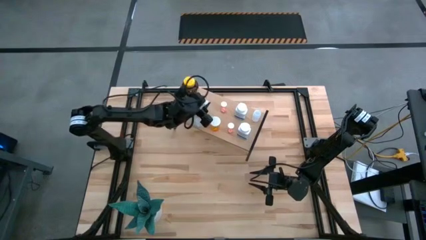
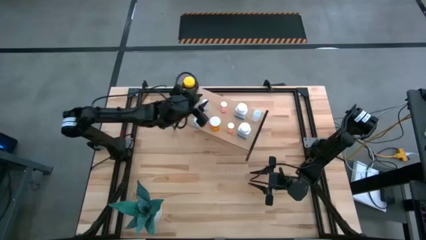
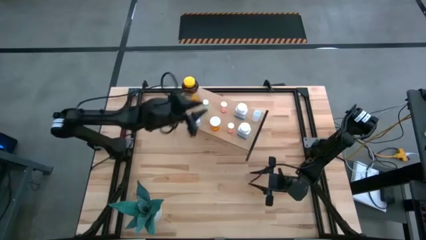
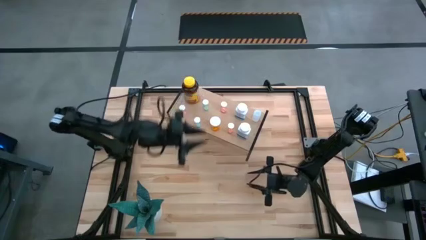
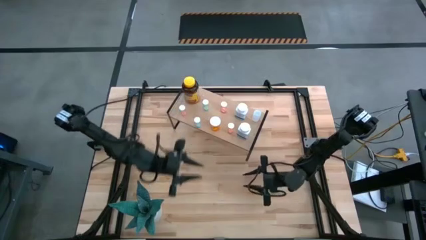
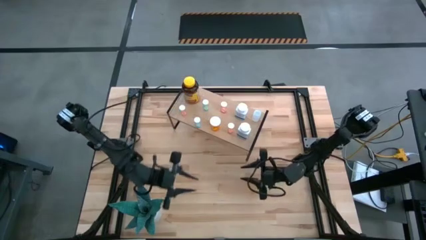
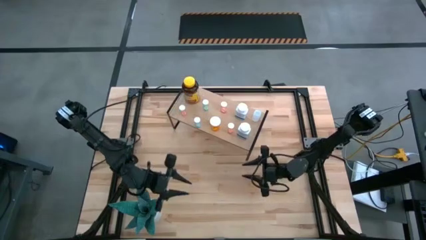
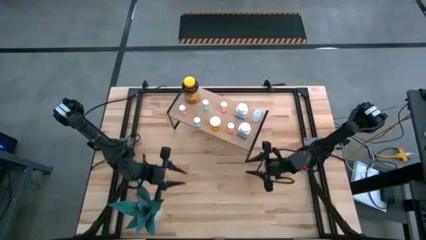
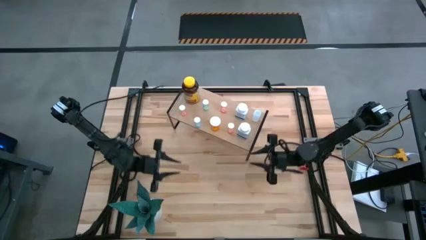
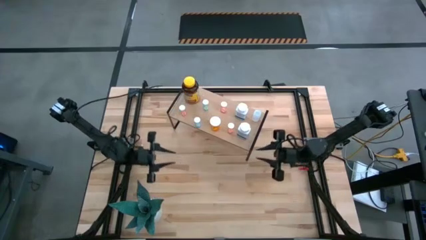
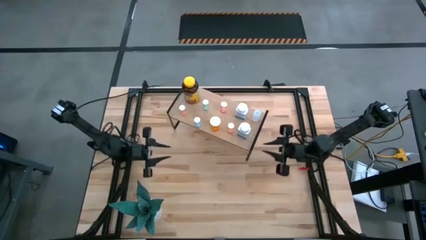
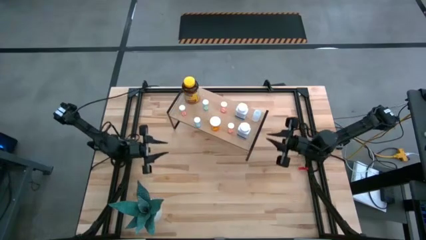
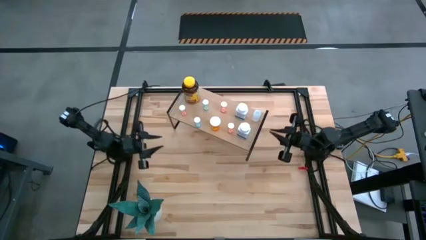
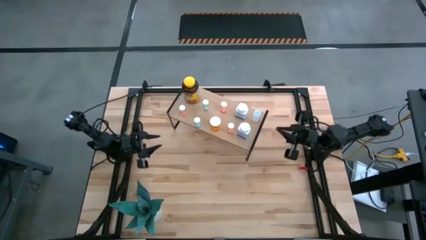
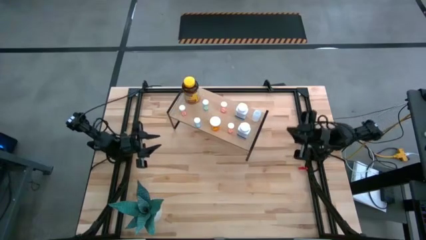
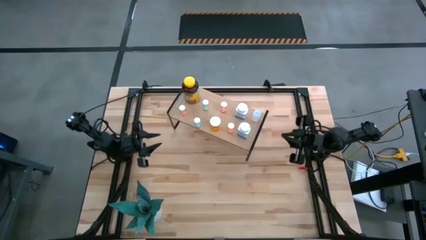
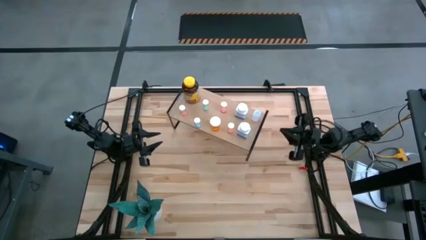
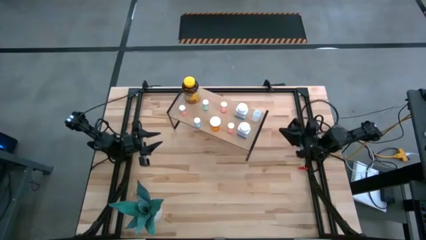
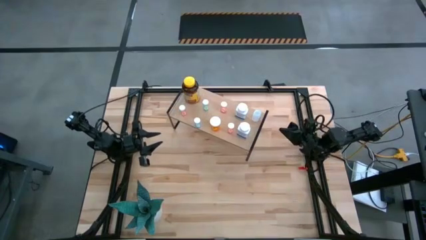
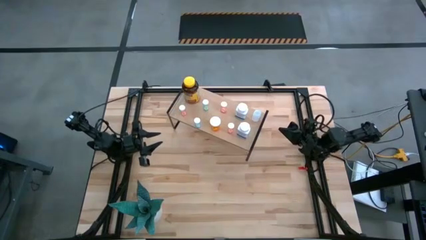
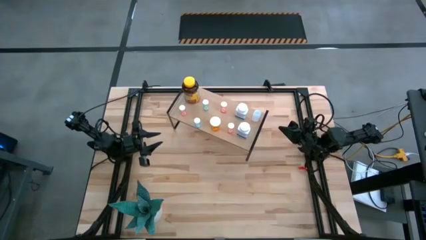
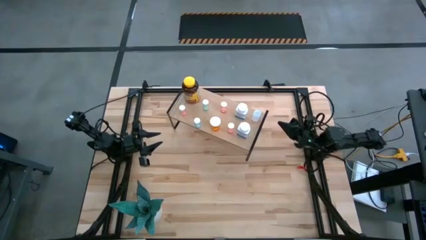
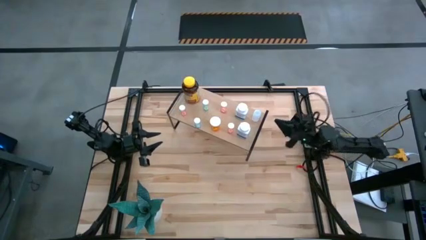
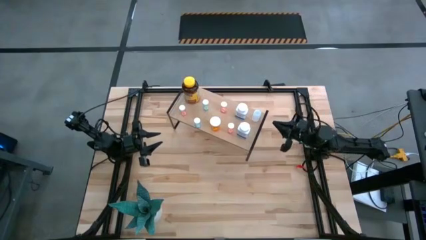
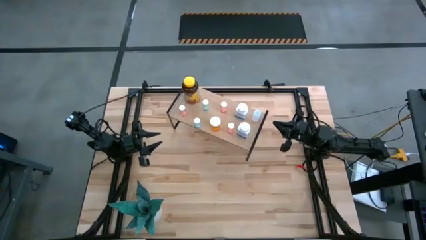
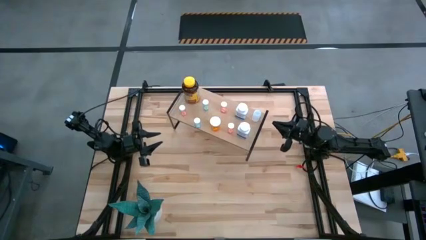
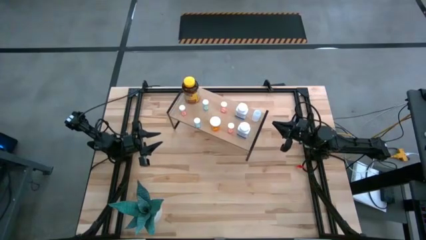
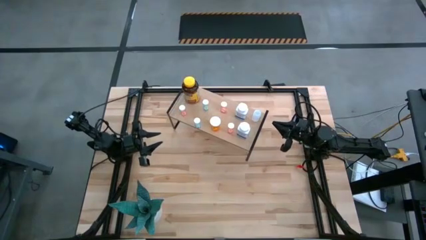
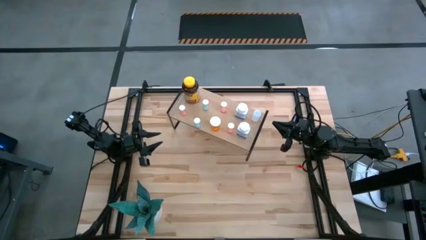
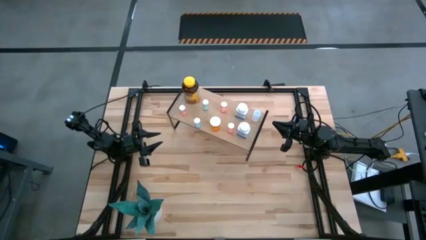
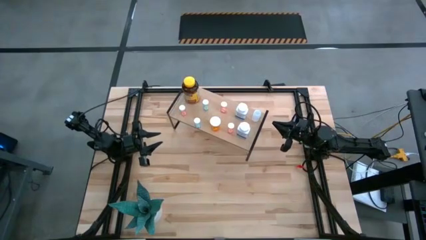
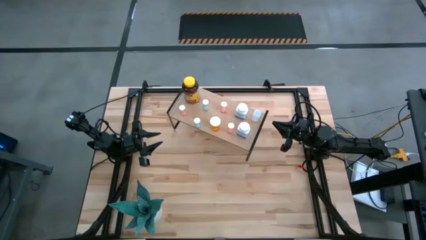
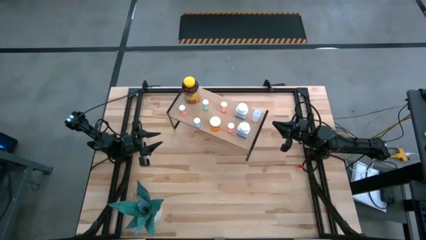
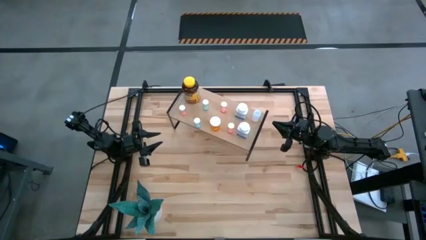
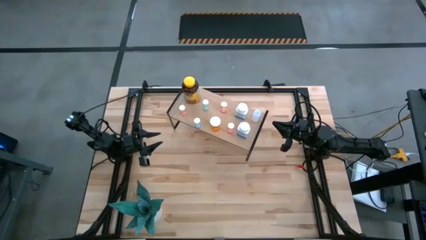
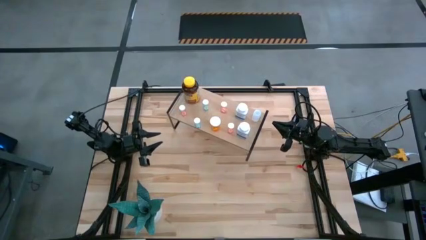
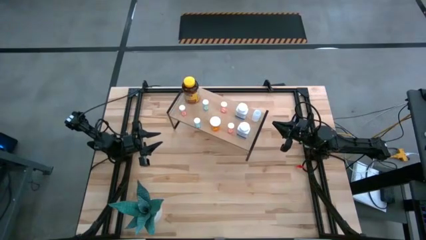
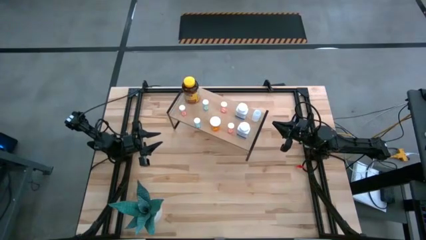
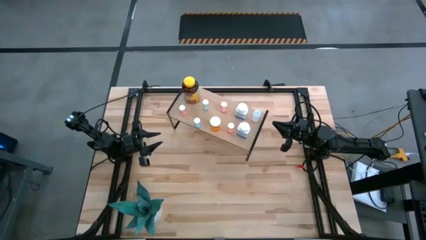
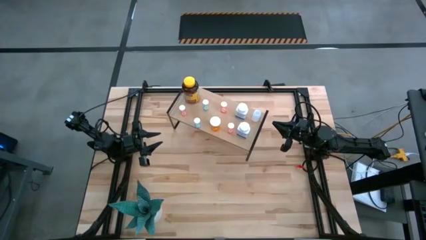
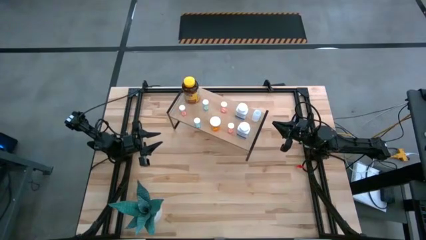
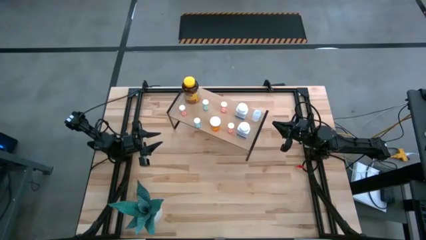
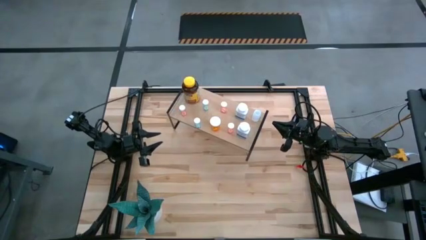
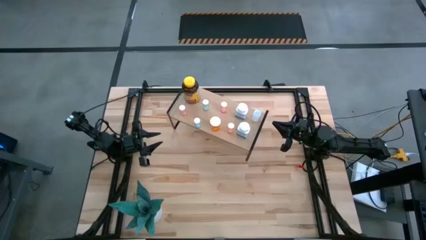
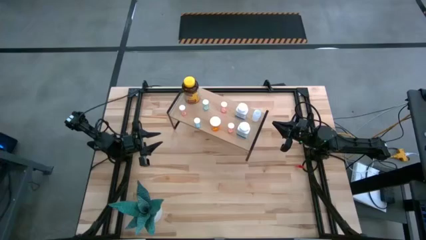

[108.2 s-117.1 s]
Task: Pick and place medicine bottles onto shelf by color
Return to Home Position

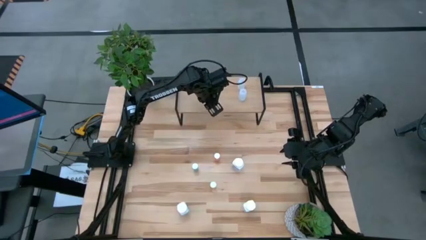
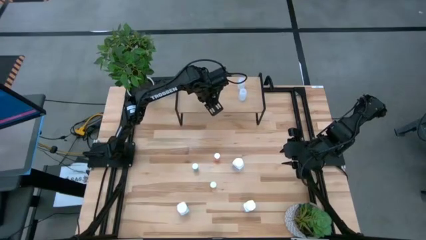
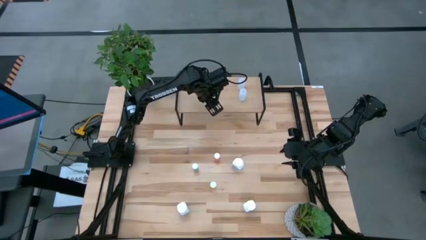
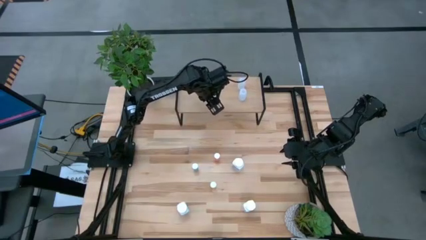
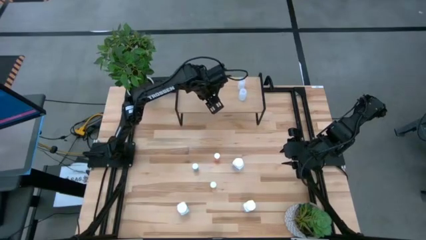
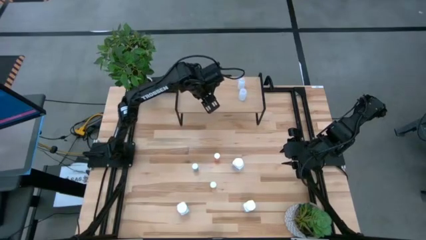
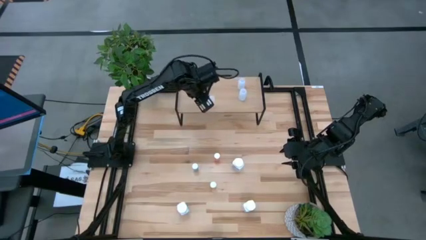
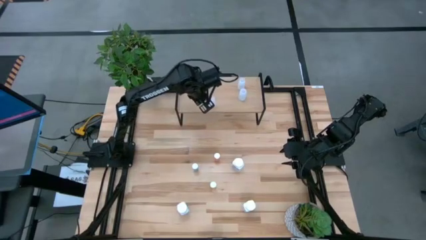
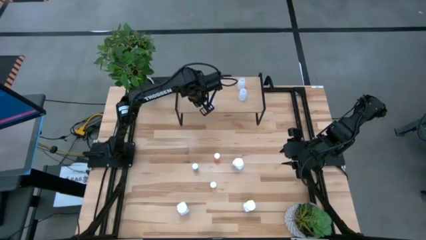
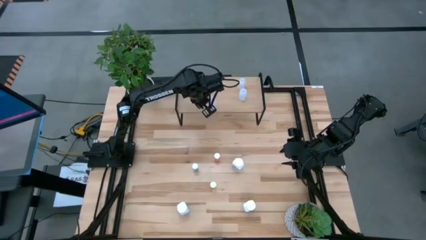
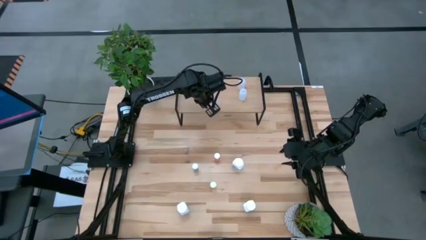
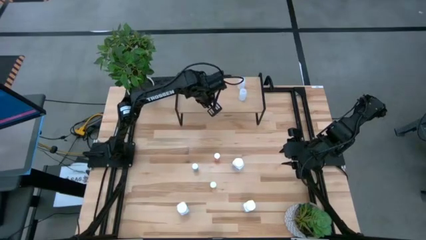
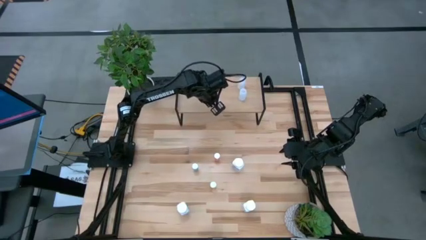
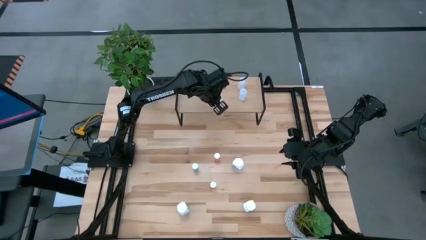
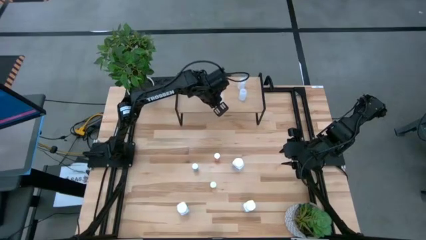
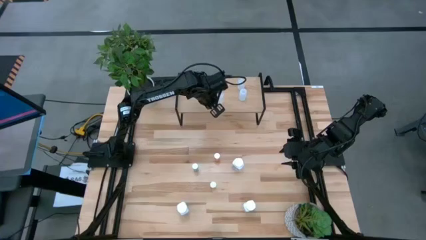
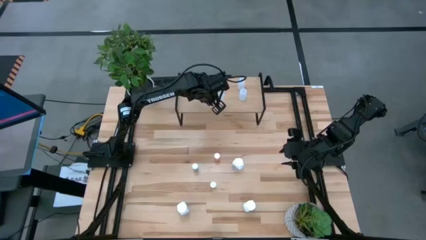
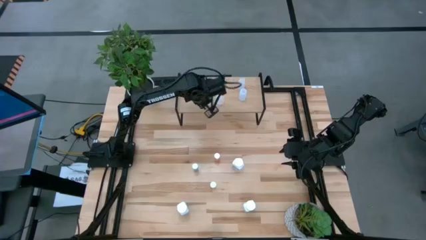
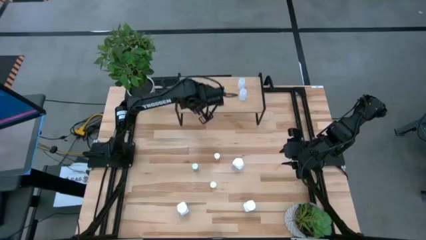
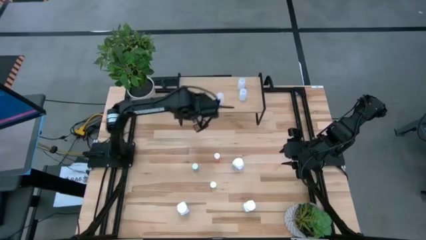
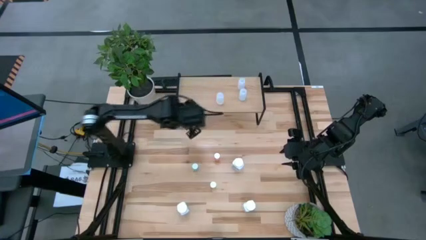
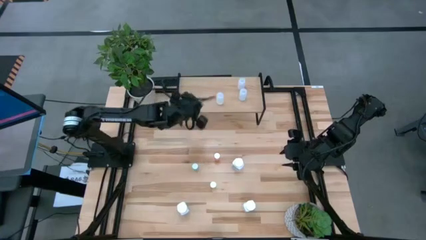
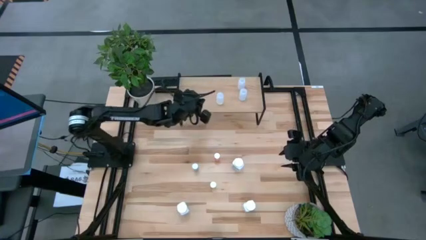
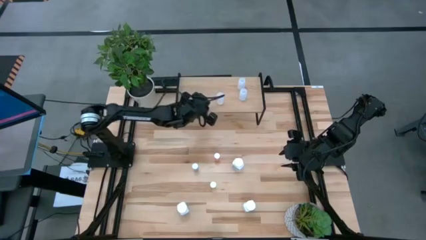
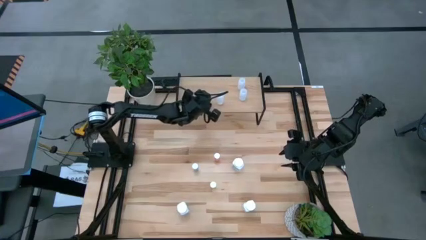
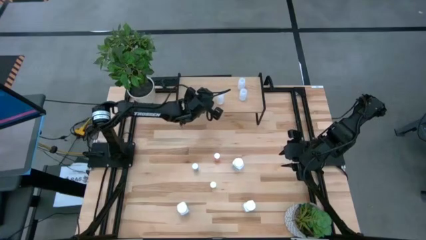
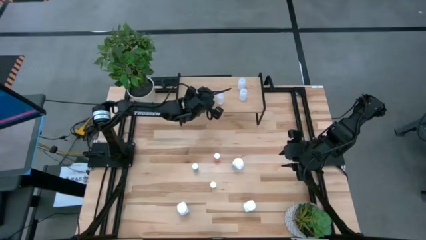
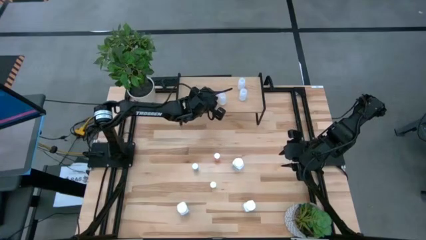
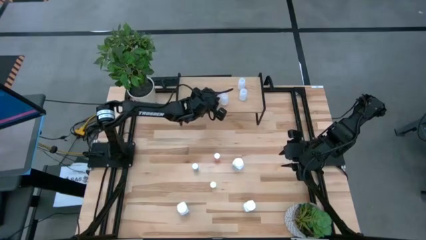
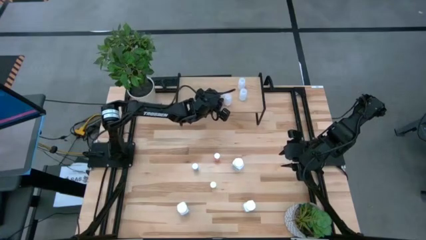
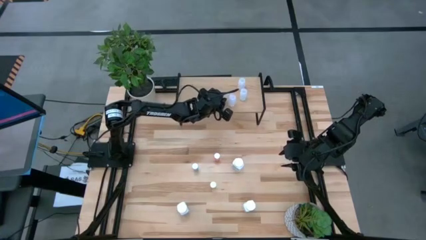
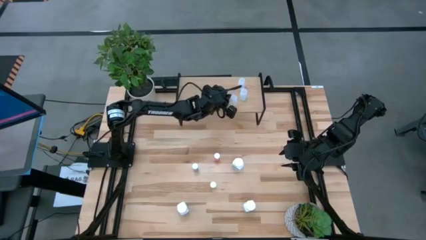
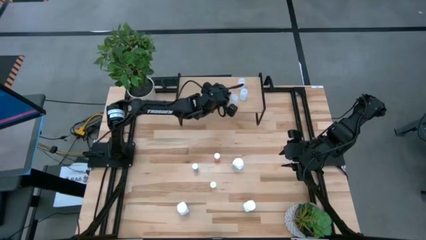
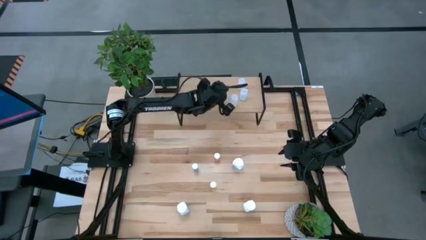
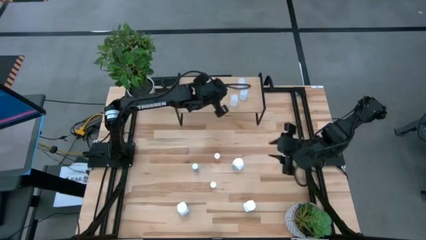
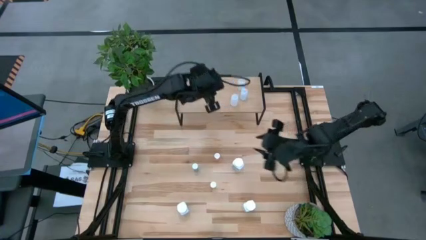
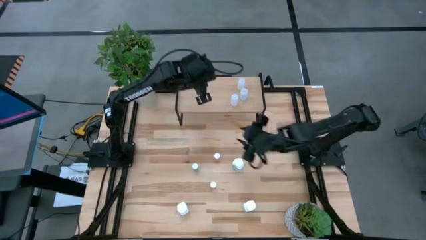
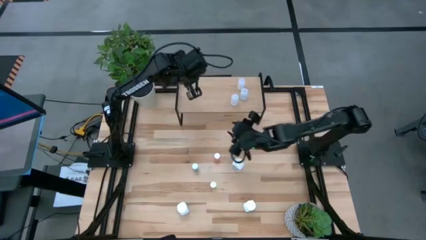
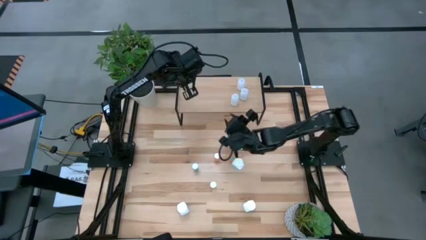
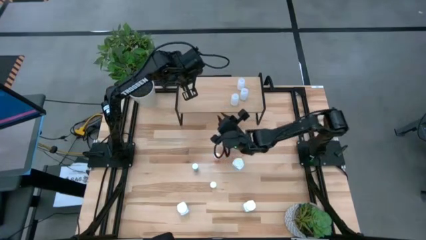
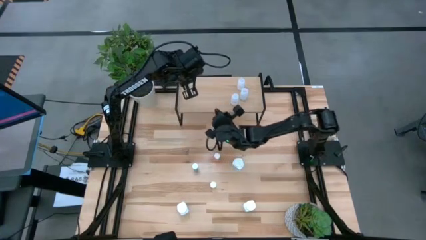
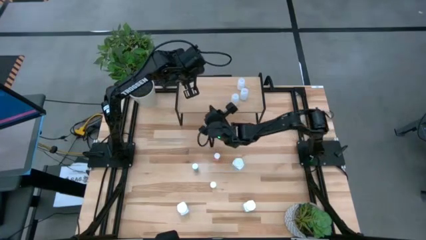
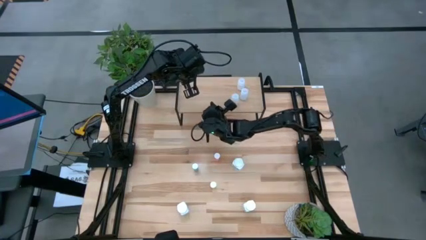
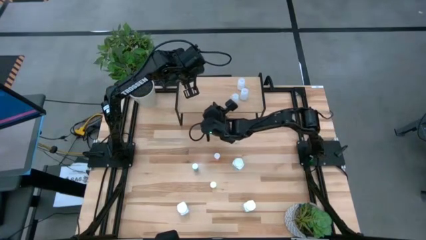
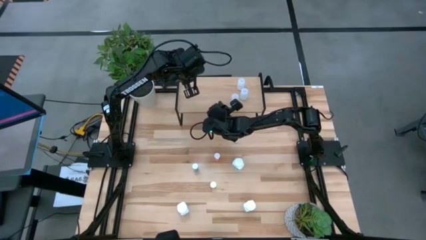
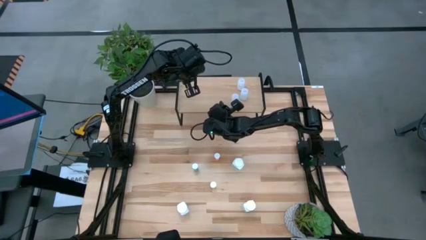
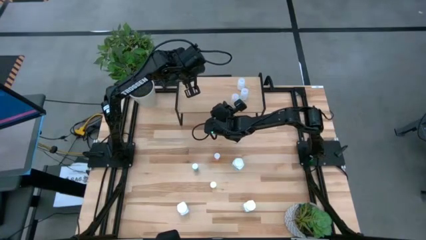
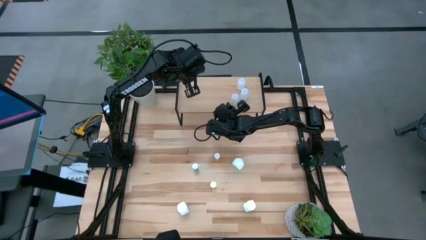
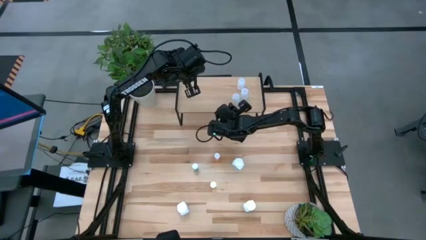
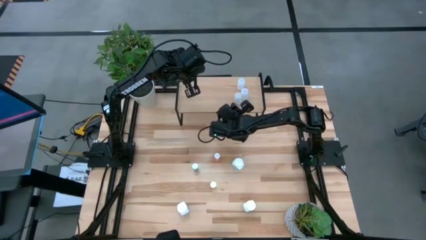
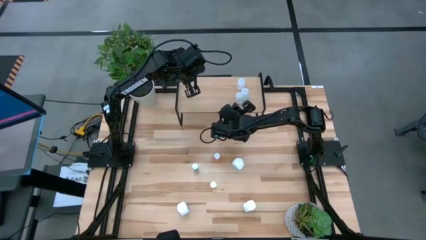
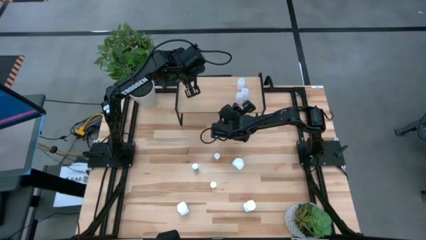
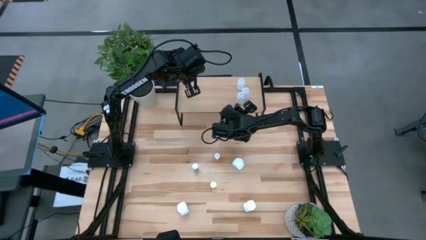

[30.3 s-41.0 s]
Task: Pick and place medicine bottles onto shelf by color
Put the white pill bottle aligned with the other white pill bottle on the shelf
